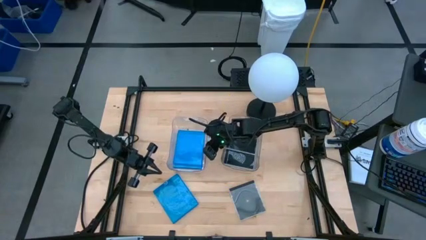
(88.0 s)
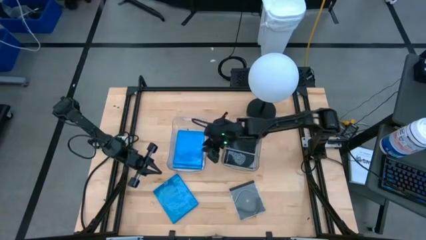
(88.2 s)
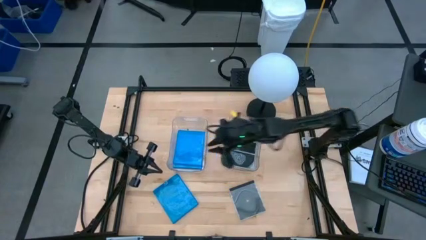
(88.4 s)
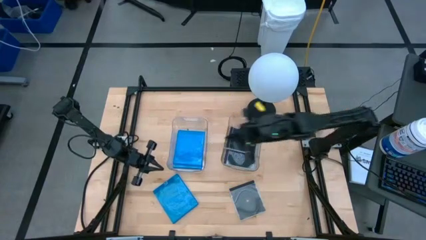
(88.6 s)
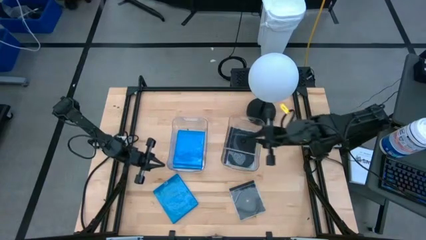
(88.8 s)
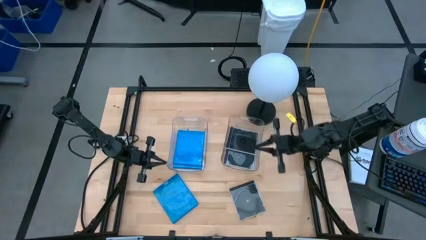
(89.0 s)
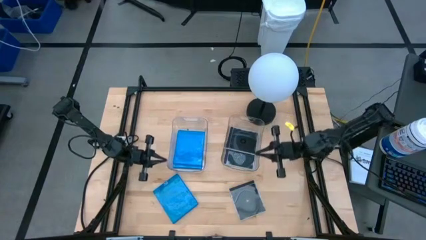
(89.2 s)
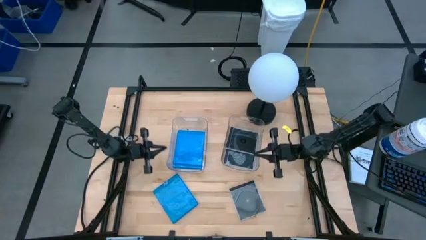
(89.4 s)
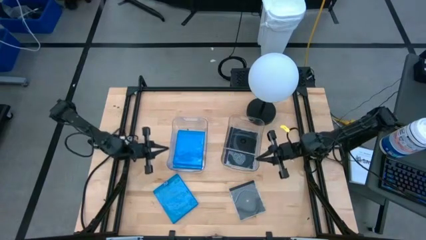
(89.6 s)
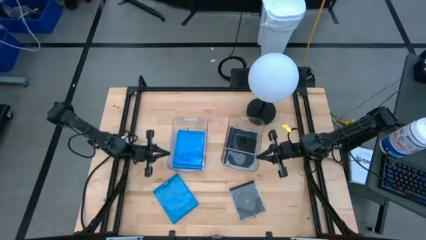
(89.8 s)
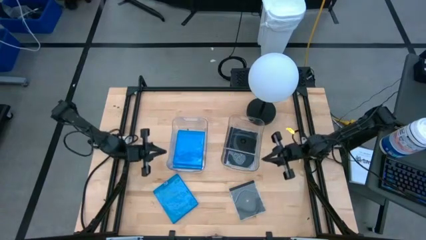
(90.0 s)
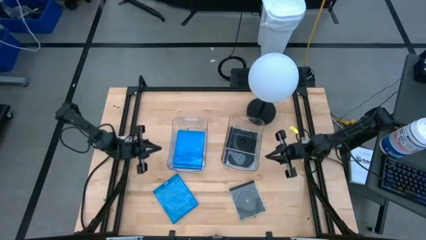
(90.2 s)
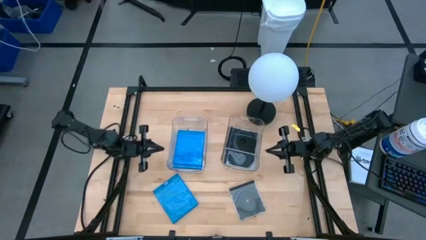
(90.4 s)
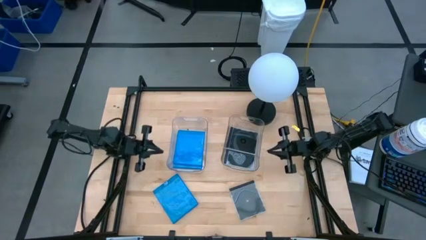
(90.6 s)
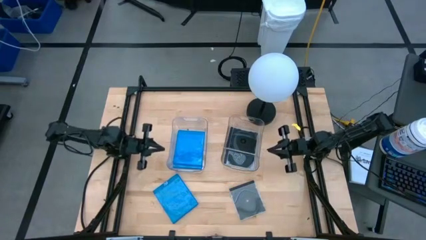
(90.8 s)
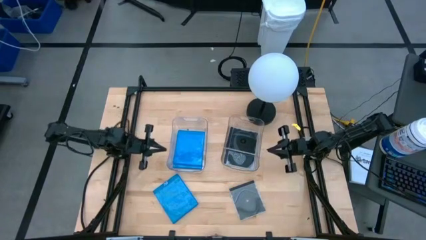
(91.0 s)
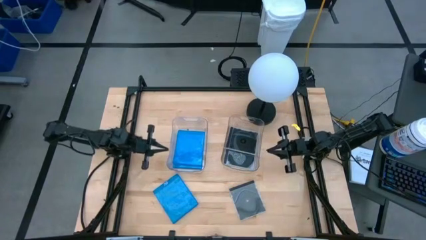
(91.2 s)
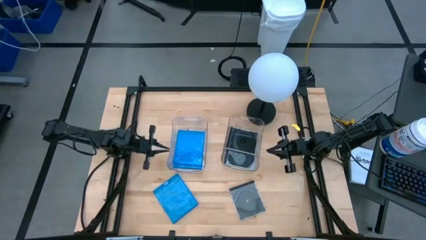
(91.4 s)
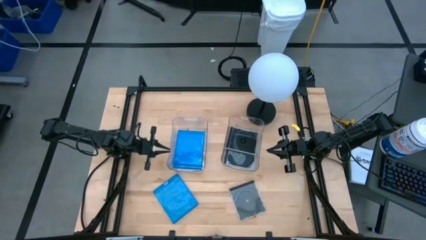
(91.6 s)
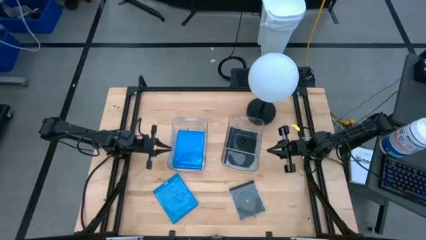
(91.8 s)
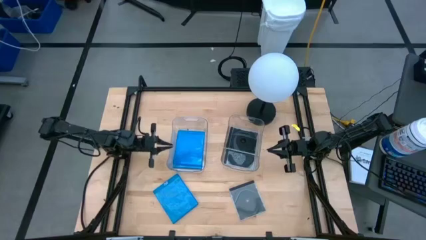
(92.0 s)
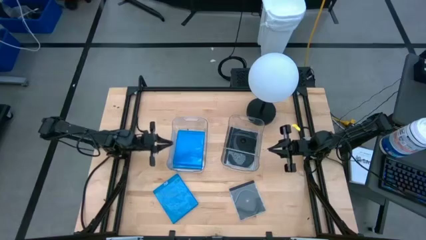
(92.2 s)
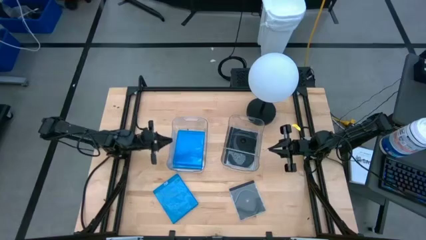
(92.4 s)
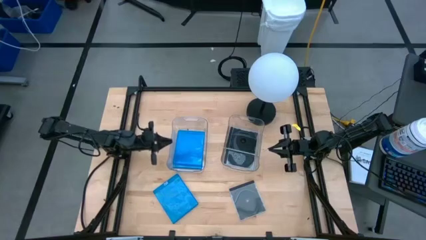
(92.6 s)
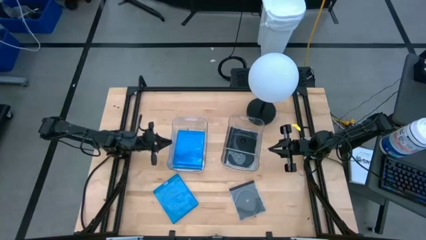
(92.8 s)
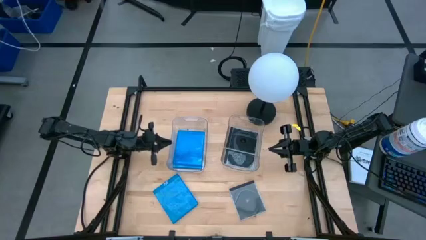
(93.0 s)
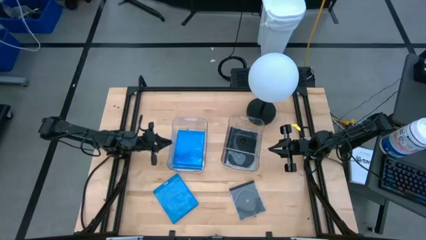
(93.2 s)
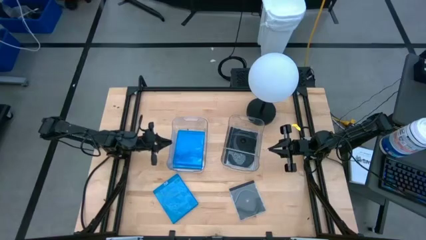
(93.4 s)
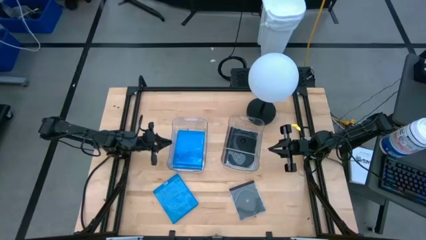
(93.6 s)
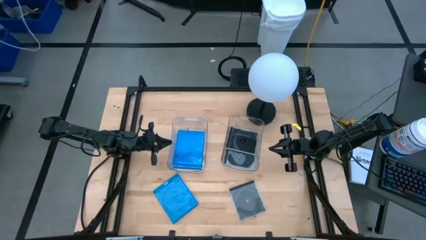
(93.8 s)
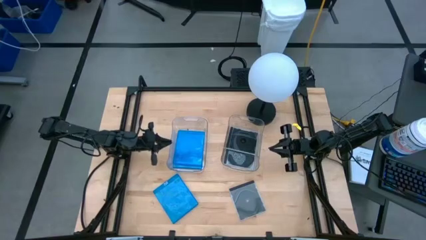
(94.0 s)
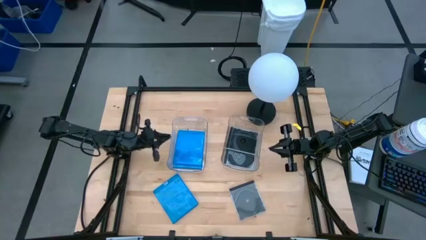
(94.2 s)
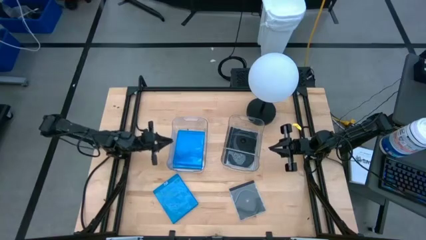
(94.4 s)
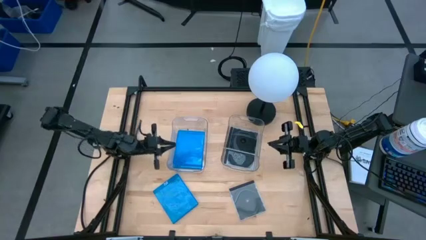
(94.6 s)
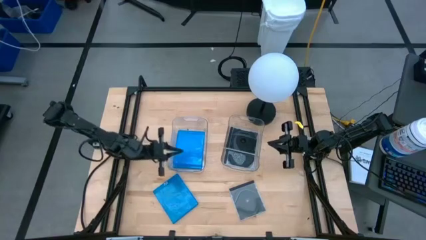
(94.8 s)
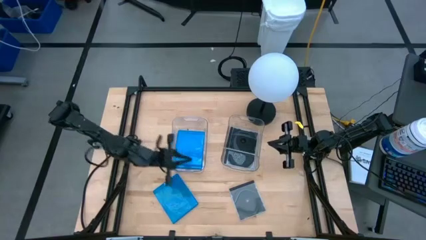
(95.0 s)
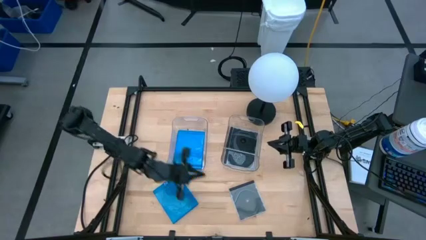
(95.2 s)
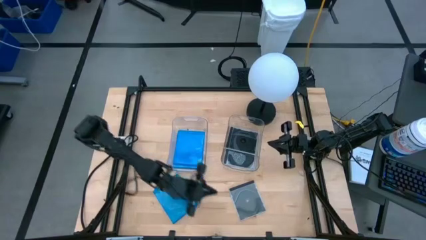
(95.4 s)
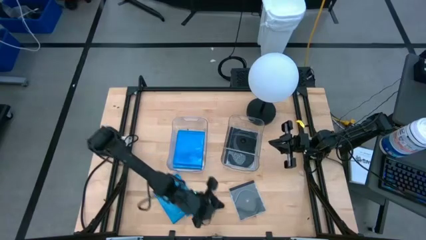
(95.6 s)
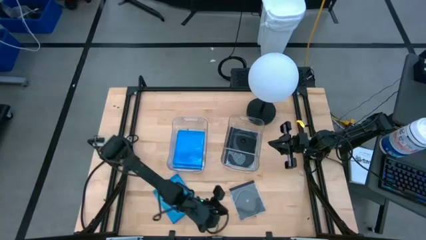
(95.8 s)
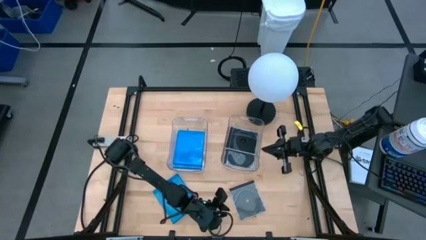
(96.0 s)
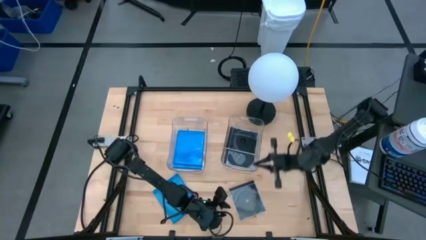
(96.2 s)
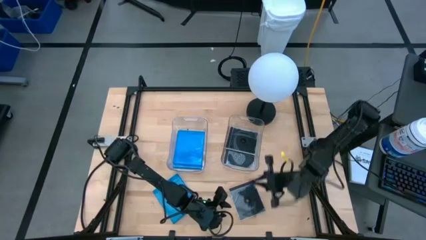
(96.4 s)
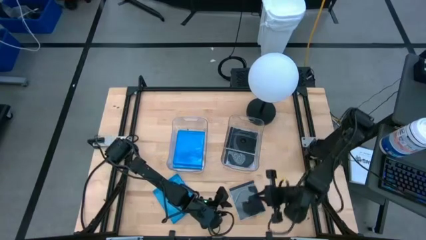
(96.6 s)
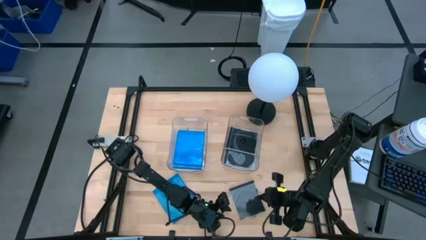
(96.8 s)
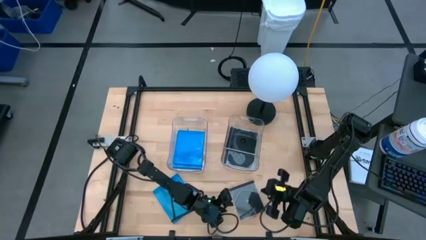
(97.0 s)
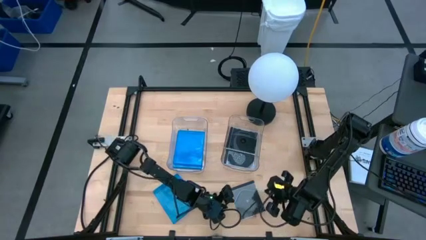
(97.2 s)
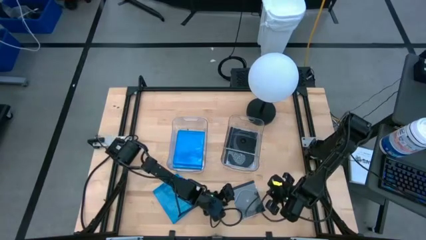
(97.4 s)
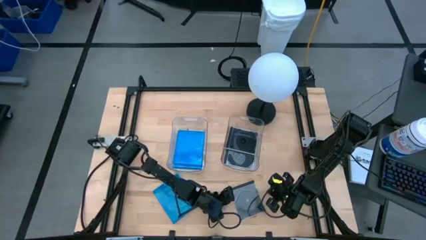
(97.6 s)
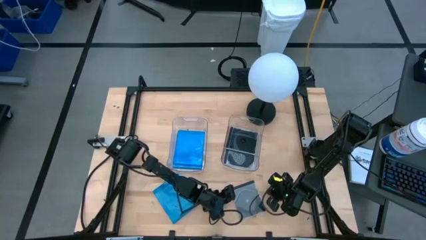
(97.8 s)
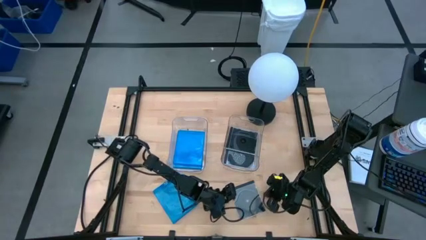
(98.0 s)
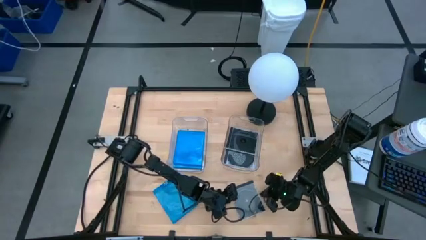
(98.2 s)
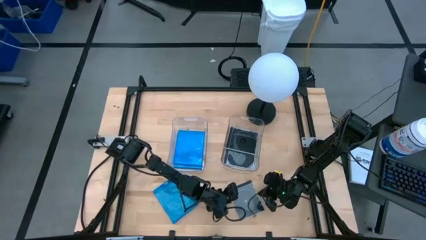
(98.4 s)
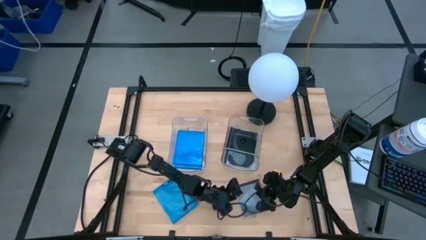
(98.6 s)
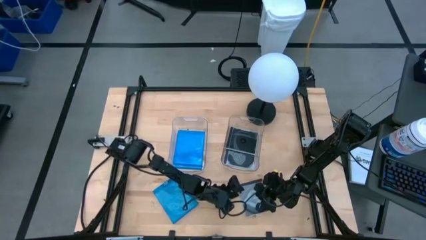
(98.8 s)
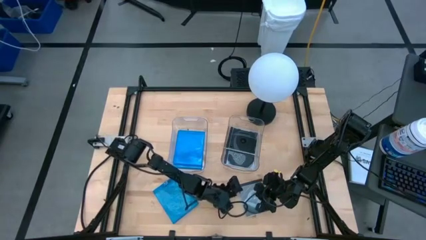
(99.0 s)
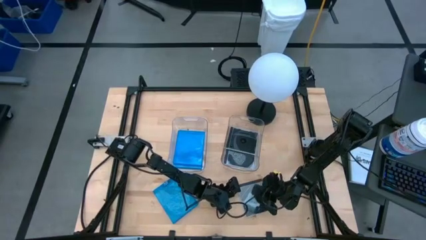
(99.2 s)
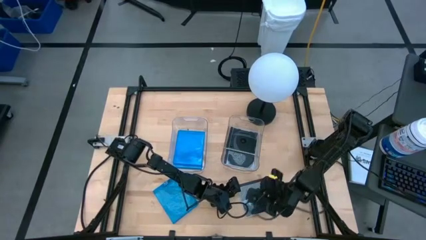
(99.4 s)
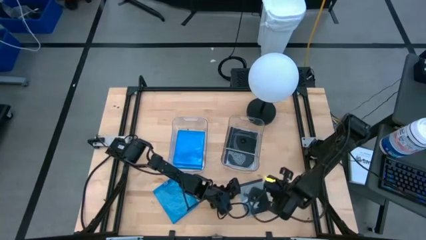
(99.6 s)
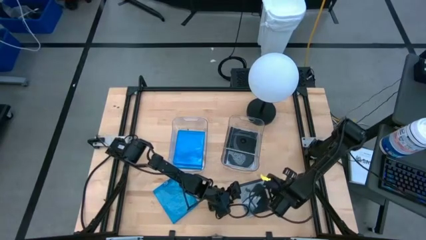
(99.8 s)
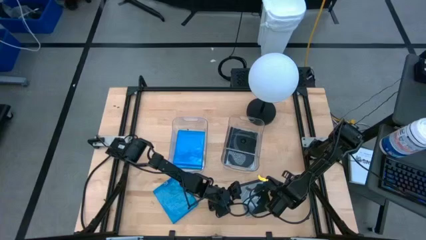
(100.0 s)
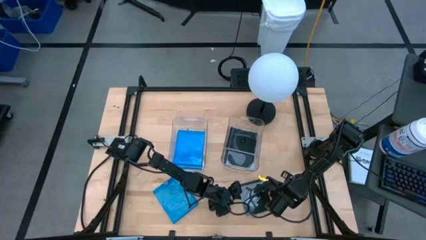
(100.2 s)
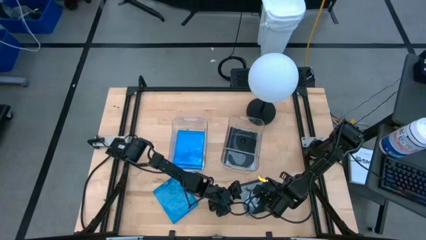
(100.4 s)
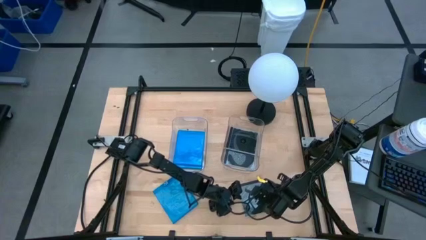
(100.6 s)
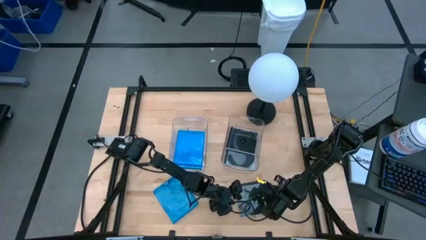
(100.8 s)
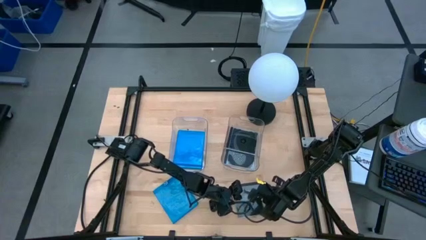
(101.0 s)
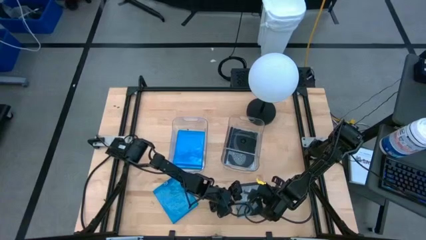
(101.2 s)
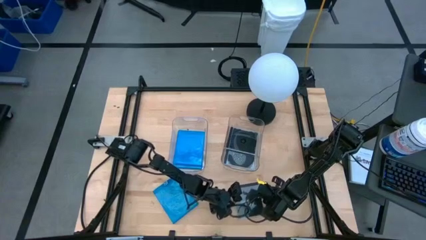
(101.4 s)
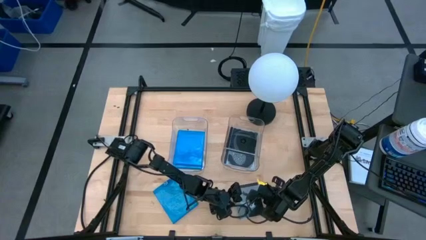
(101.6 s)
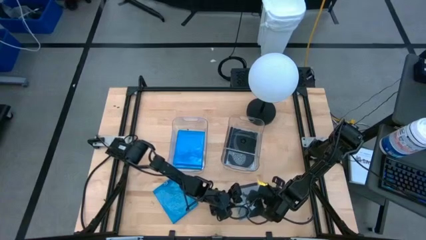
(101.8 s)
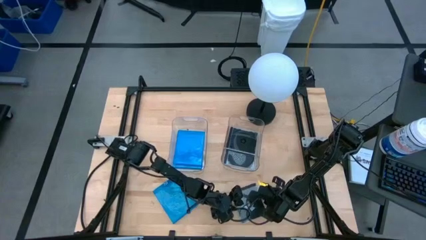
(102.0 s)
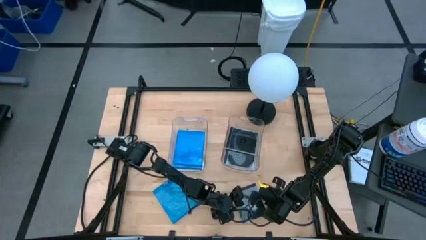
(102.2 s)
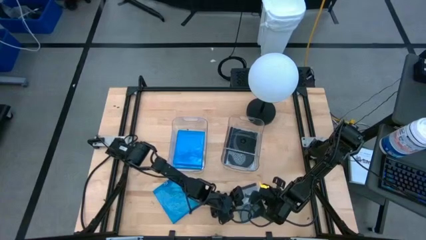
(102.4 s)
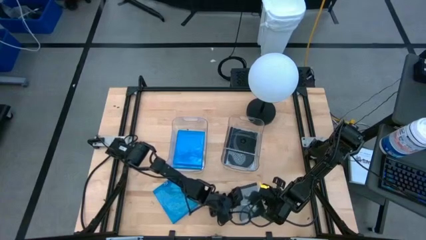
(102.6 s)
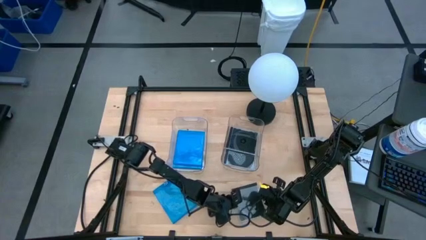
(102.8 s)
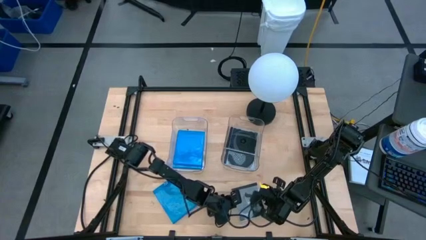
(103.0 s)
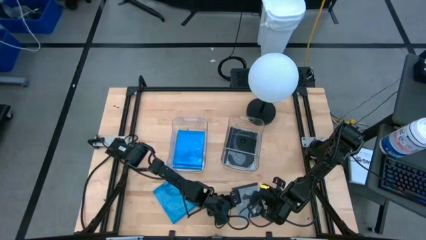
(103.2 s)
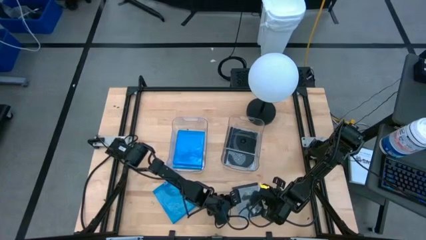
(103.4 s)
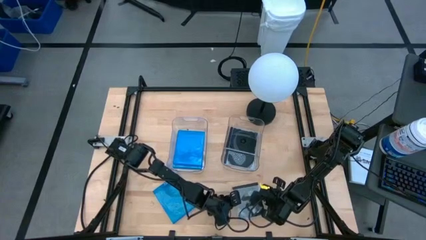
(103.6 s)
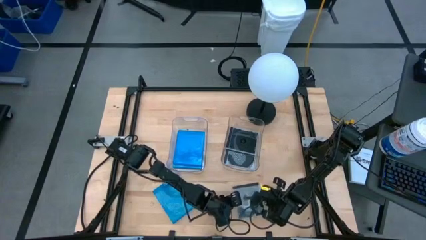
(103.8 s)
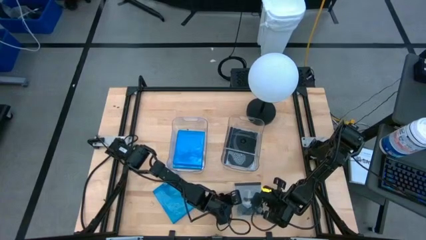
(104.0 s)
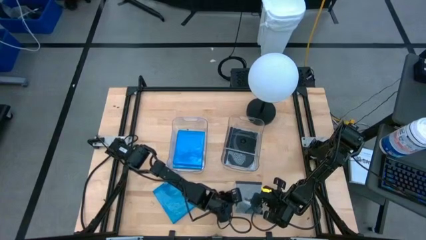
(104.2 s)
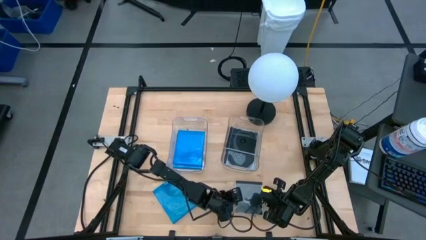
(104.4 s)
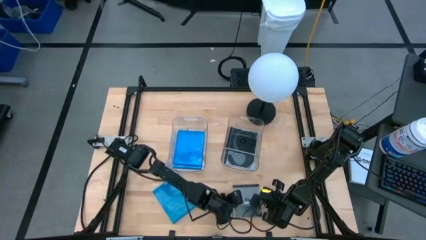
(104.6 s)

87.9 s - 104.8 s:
Task: Pick & place jewel cases by type
Put the black CD case into the right transparent bin
